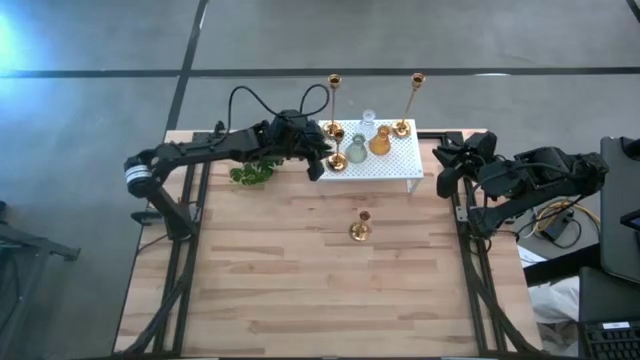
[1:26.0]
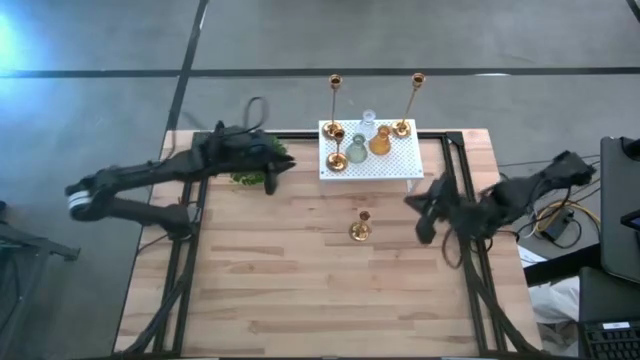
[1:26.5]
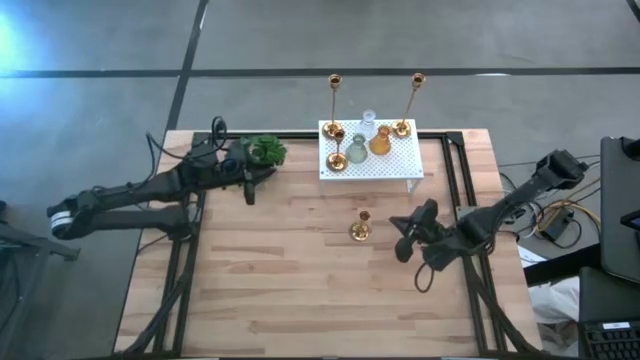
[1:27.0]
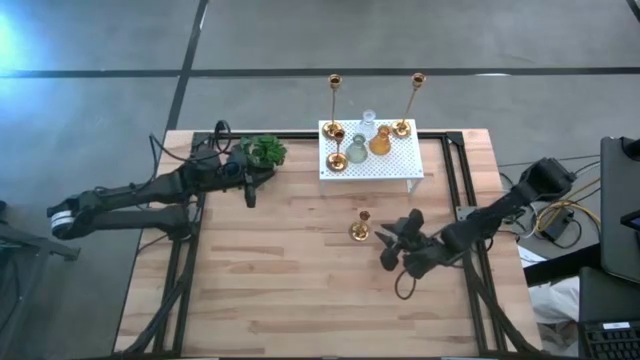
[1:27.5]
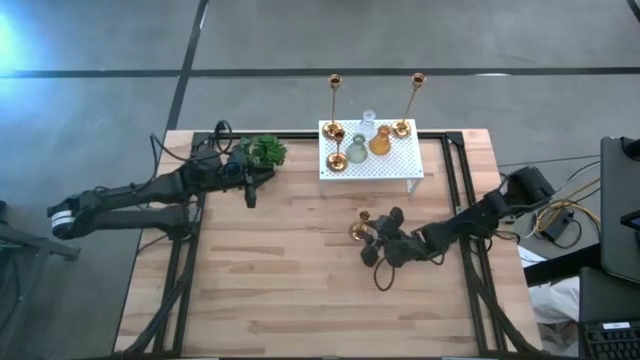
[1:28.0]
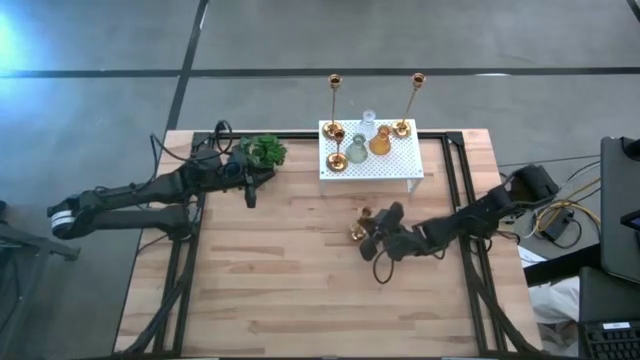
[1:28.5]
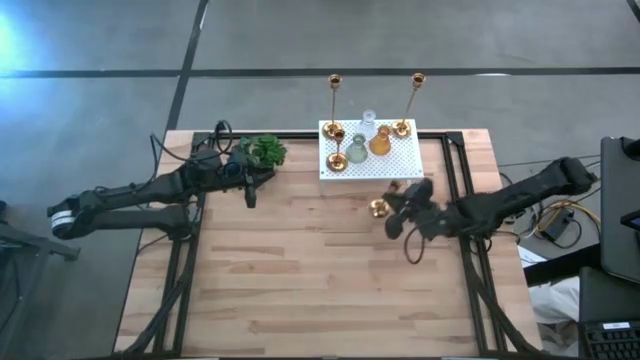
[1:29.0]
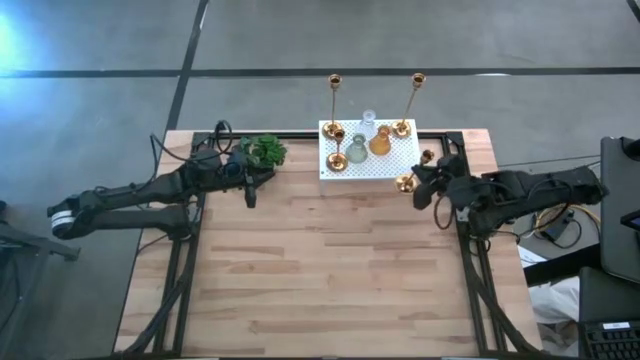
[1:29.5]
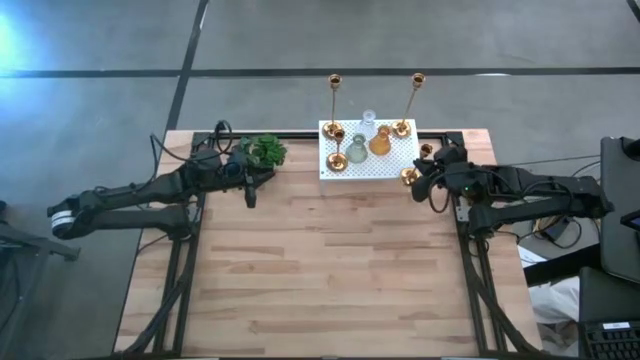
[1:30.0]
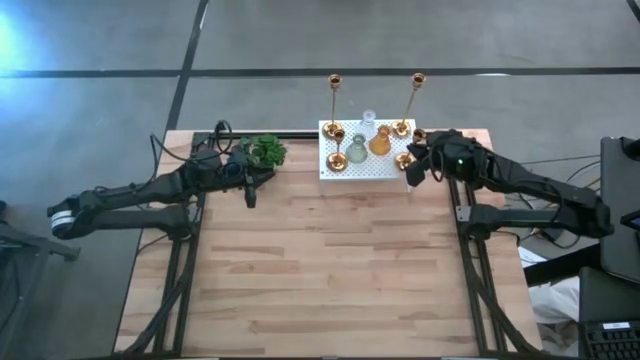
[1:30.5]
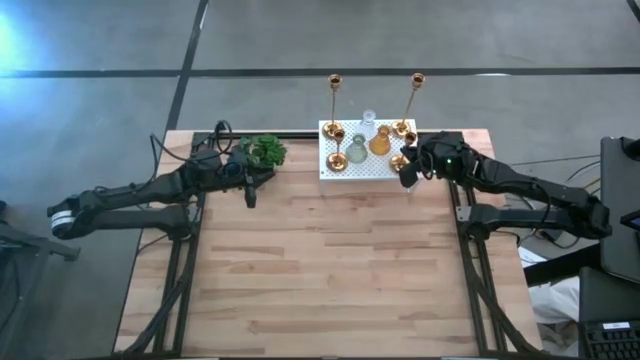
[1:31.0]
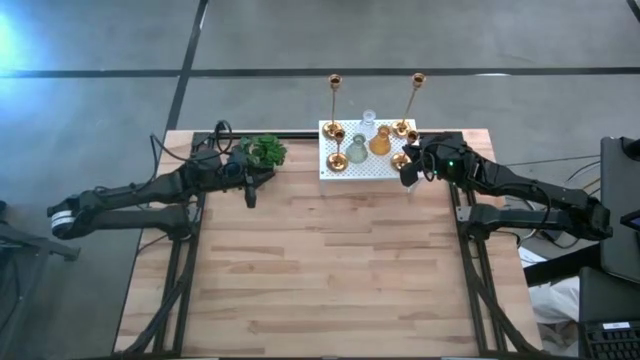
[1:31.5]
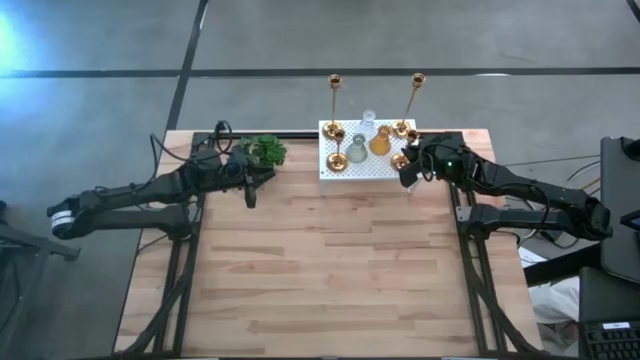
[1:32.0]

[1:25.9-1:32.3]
Task: Pick & Place candle stick holders
Align the golden candle holder with the golden candle holder on the shelf

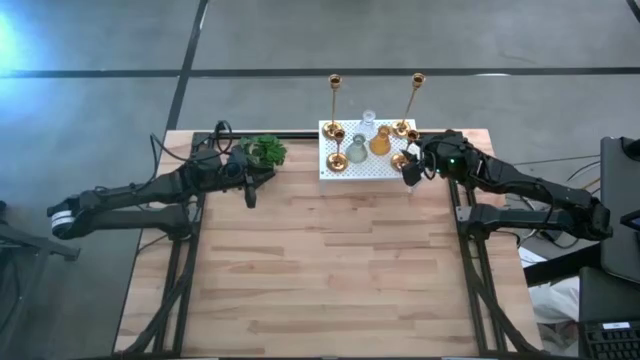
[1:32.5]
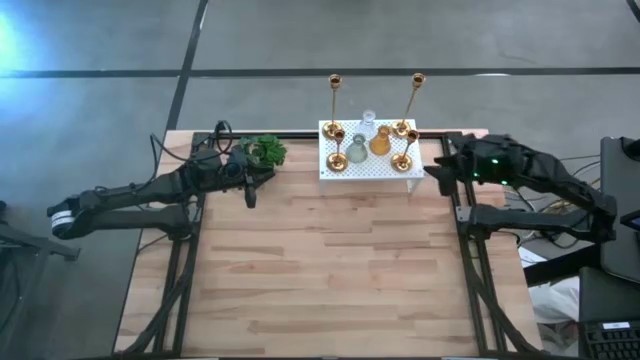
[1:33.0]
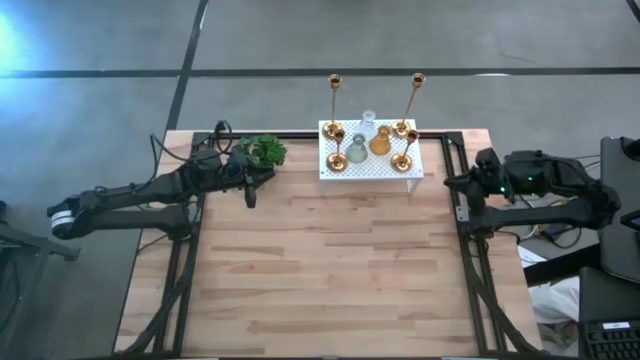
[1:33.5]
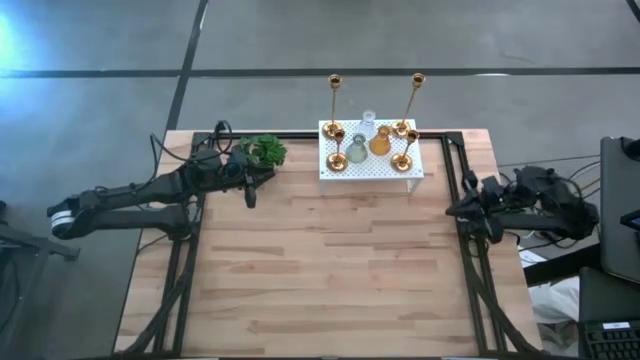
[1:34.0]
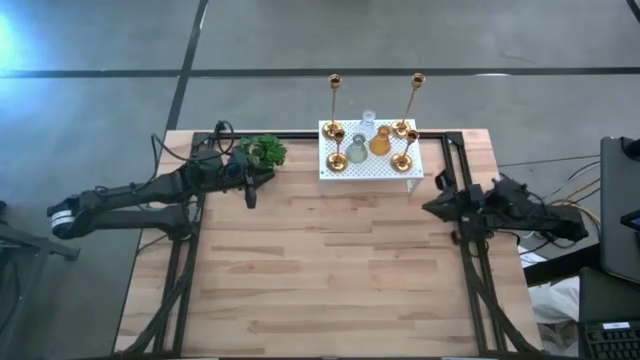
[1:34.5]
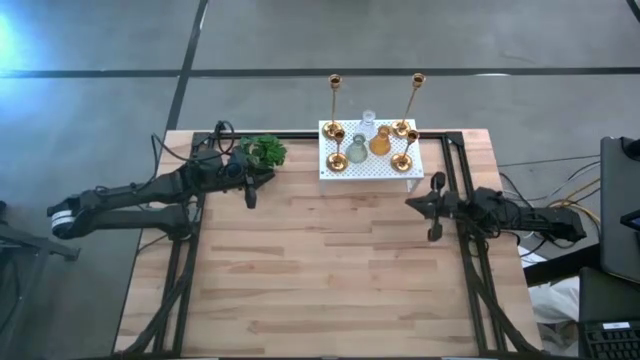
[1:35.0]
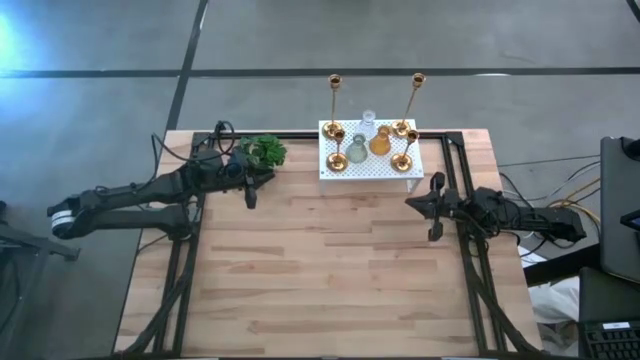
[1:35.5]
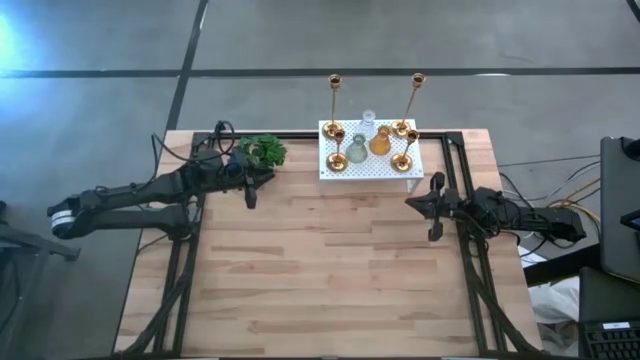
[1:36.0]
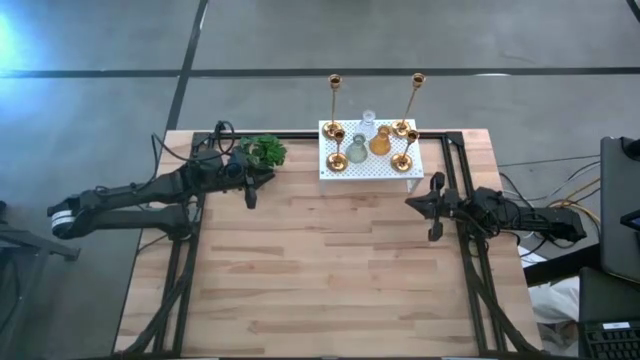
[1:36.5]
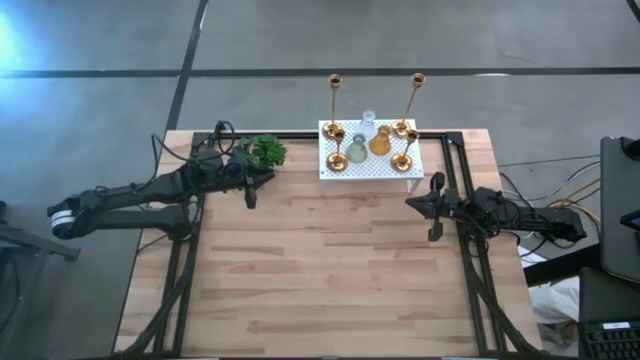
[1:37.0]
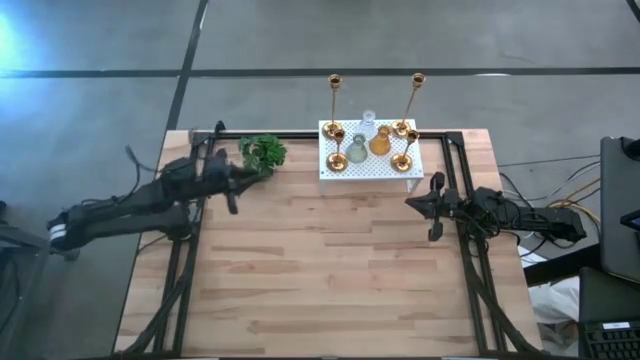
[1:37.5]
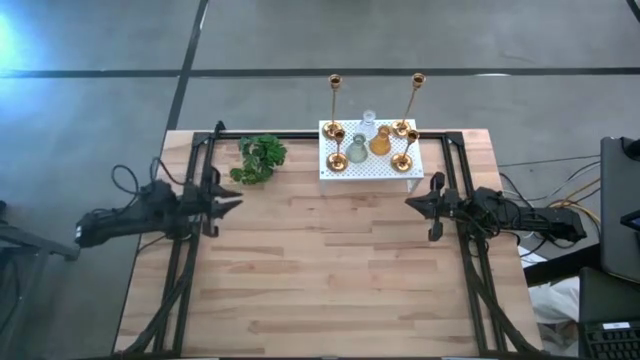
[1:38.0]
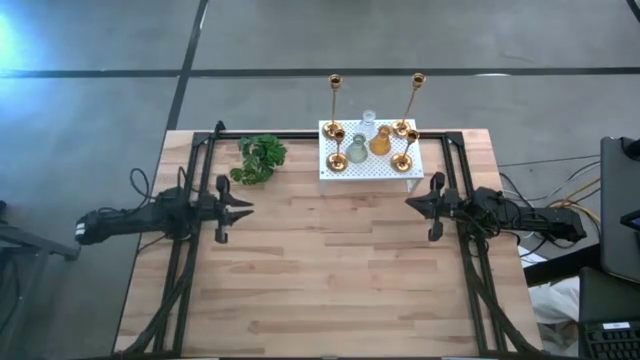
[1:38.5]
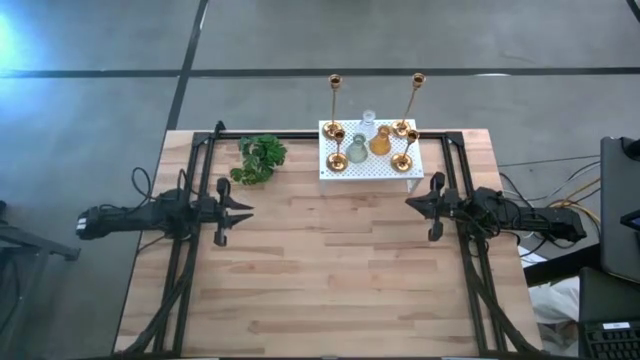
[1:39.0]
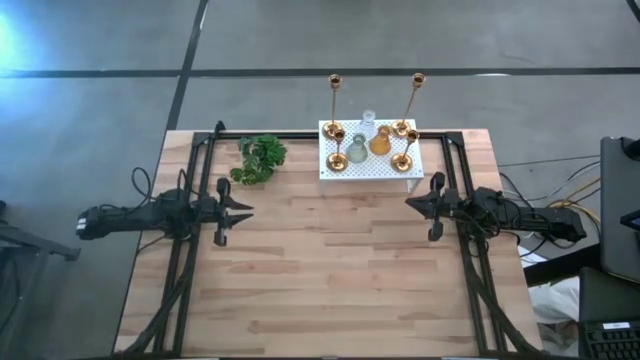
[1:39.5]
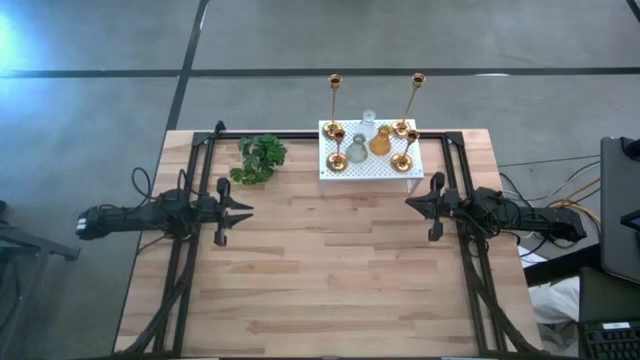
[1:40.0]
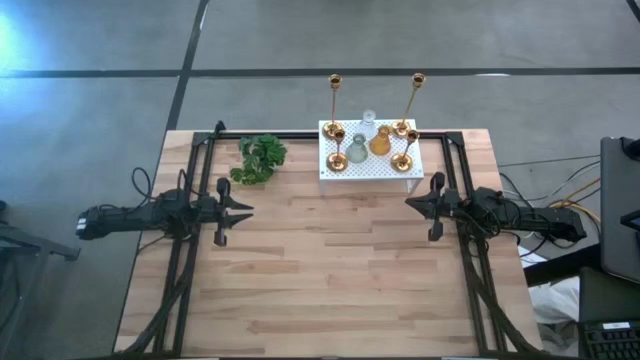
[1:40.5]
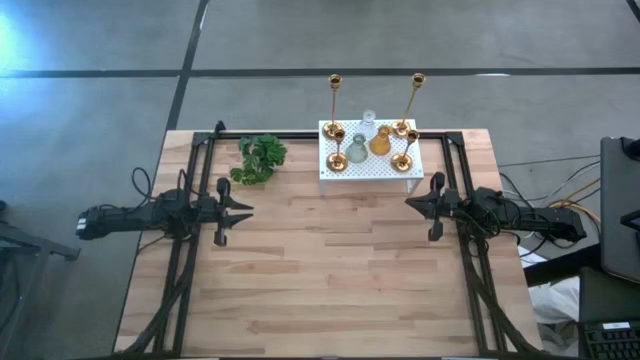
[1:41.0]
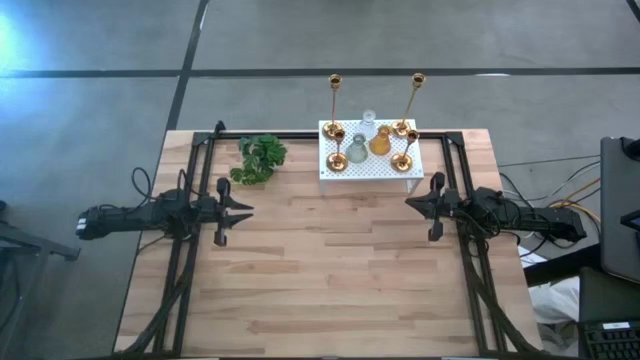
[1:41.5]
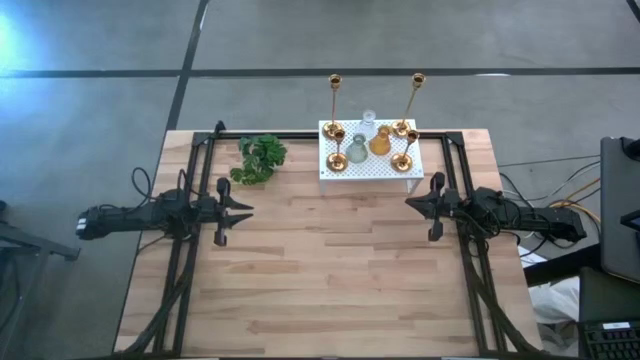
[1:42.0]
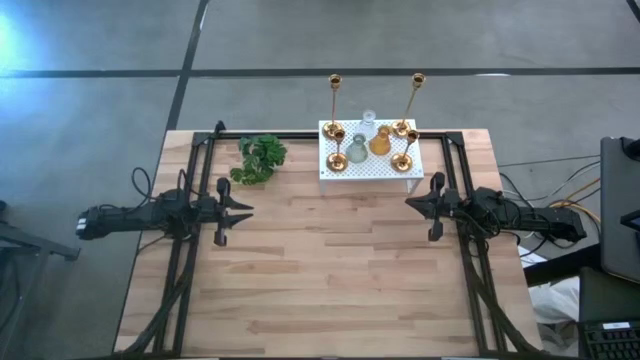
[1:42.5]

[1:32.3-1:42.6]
Return to Home Position

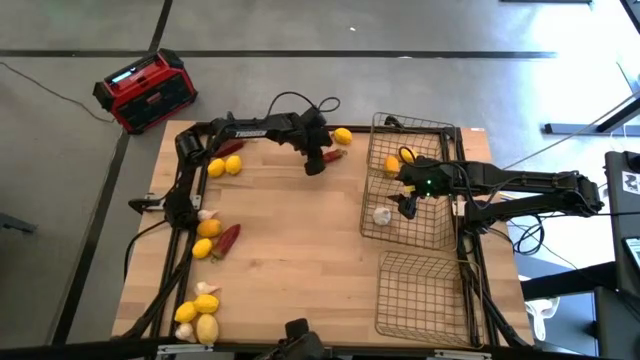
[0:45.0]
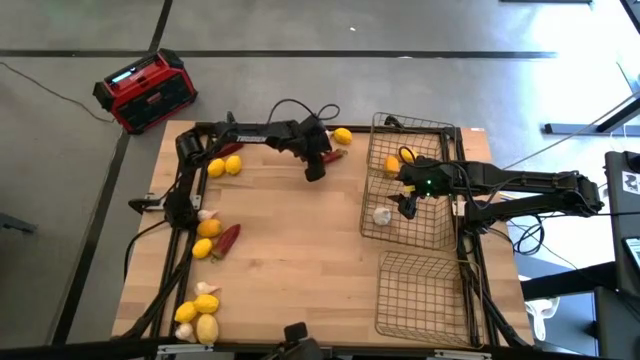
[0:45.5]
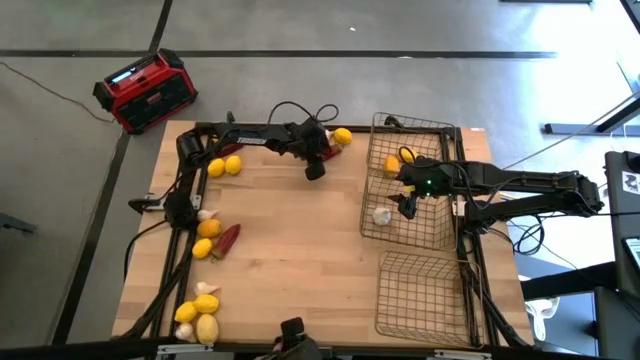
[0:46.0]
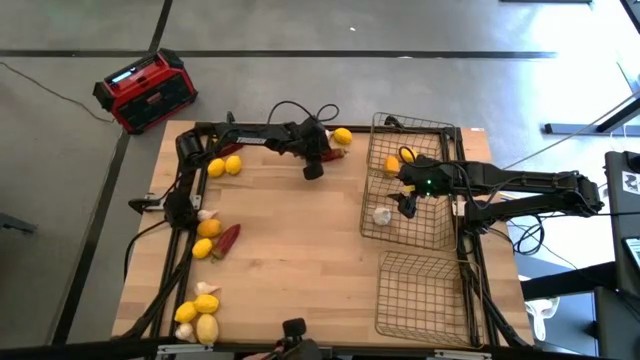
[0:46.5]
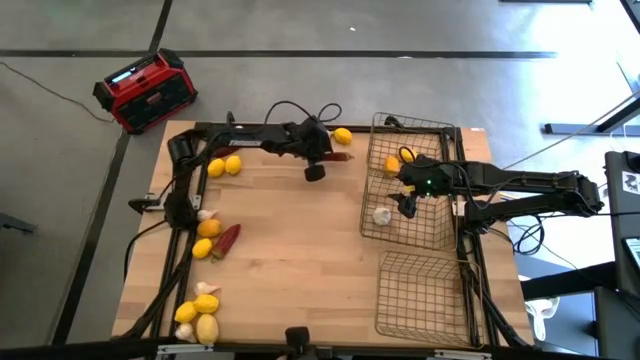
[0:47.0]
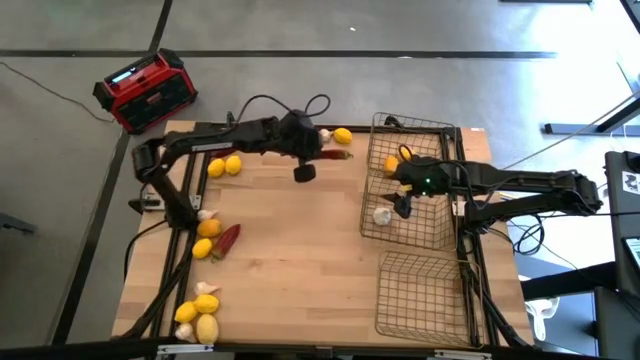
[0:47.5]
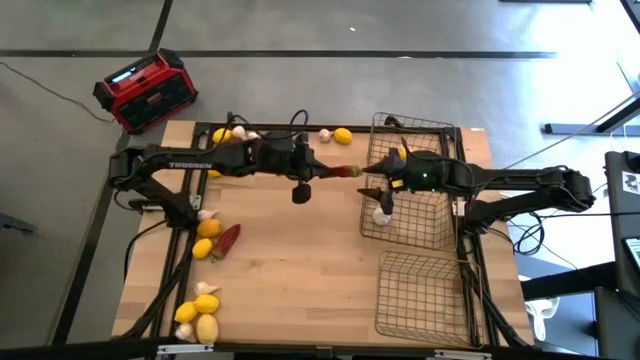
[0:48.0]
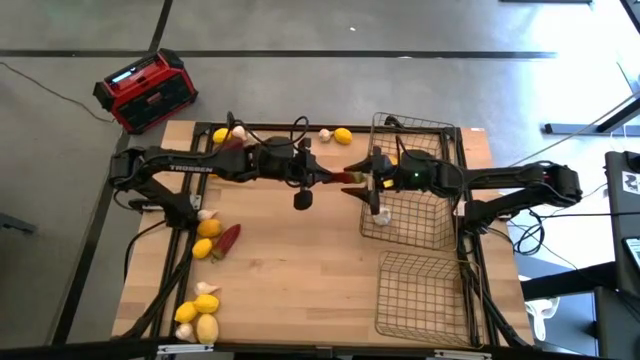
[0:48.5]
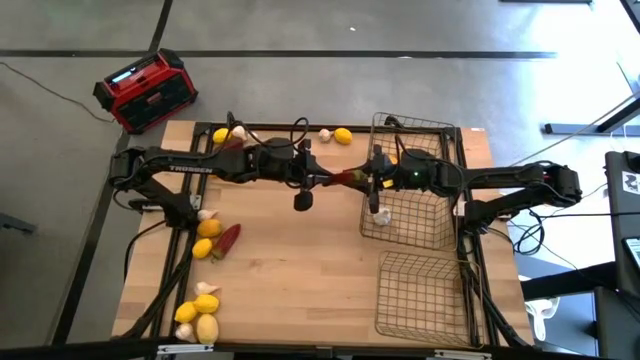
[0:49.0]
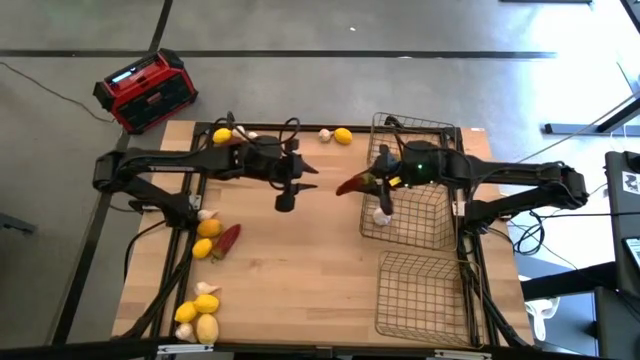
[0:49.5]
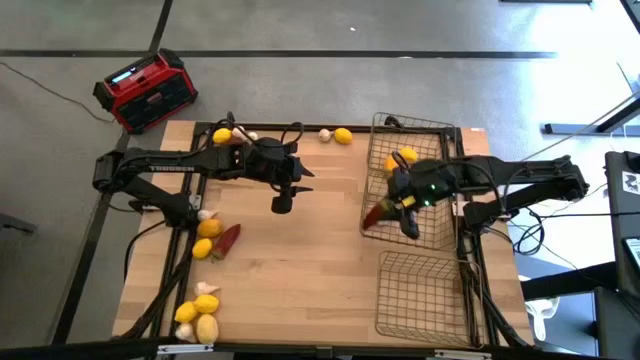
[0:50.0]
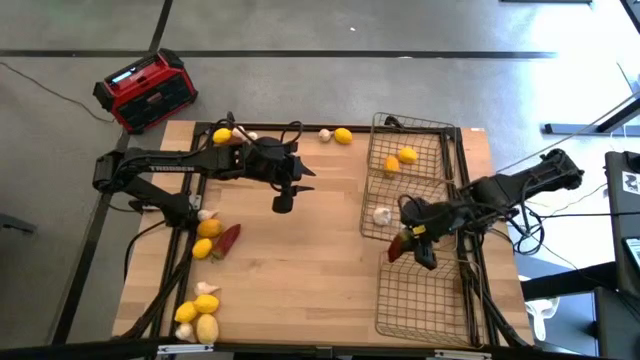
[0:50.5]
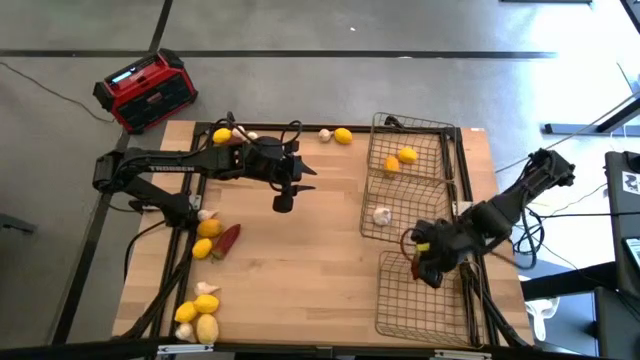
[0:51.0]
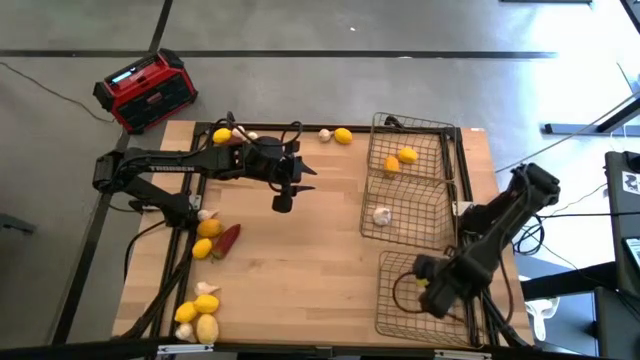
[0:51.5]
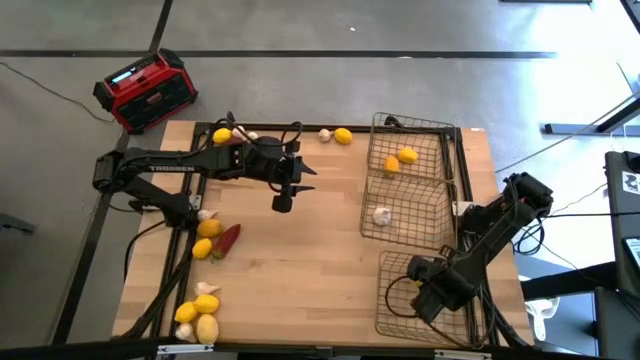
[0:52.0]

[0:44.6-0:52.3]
Task: Sort produce into baskets
Put the red chili pepper into the bottom wire basket
